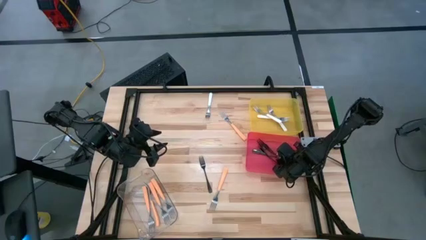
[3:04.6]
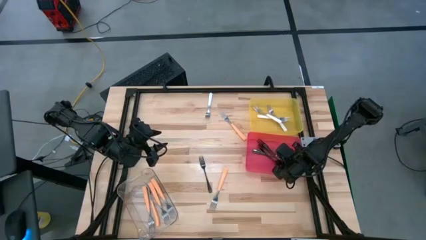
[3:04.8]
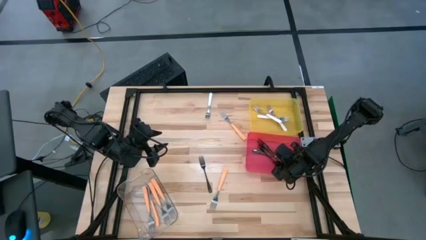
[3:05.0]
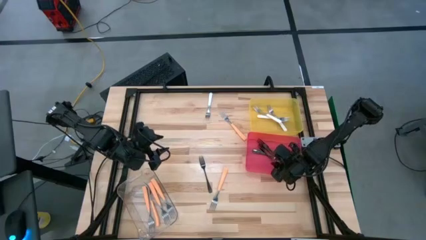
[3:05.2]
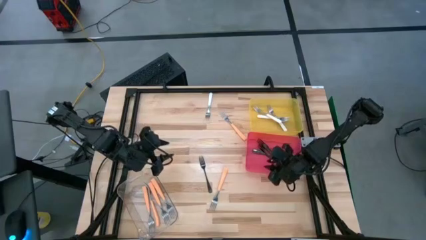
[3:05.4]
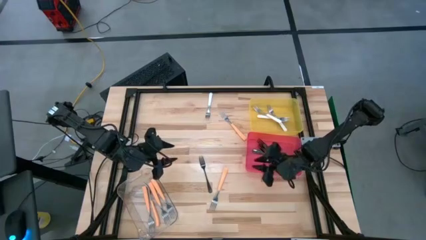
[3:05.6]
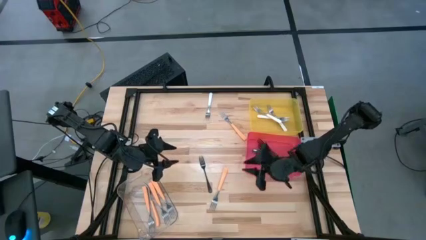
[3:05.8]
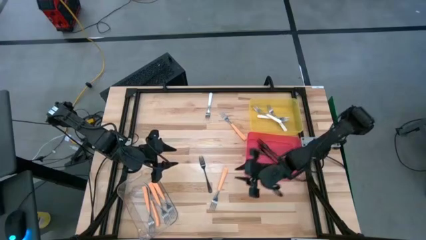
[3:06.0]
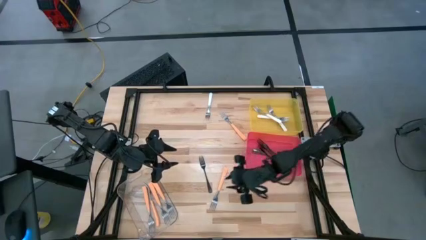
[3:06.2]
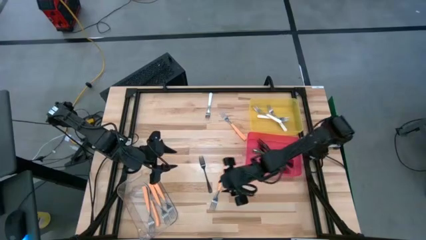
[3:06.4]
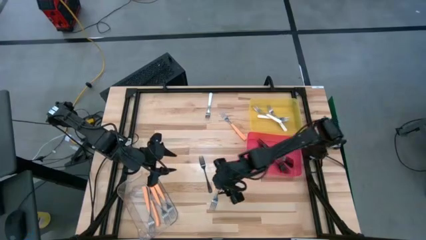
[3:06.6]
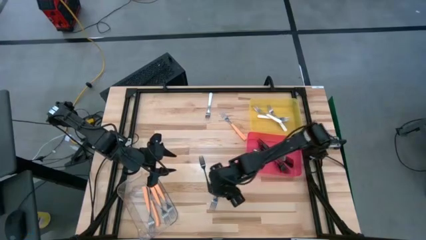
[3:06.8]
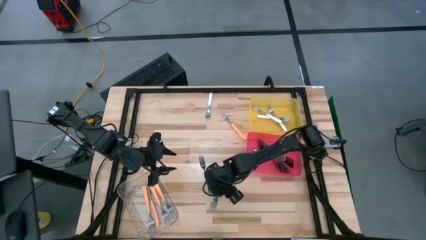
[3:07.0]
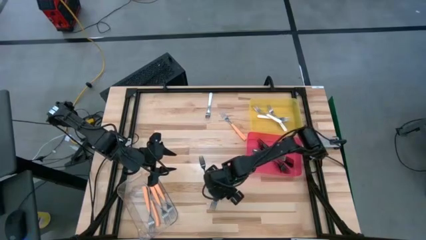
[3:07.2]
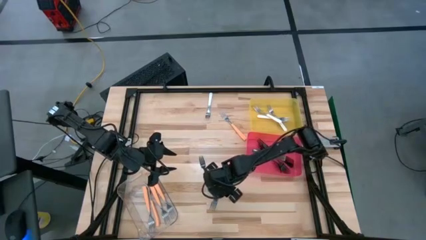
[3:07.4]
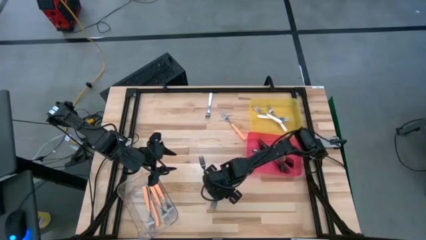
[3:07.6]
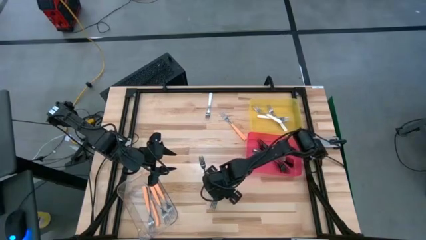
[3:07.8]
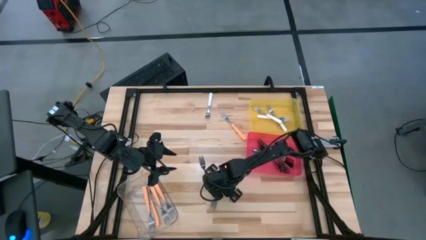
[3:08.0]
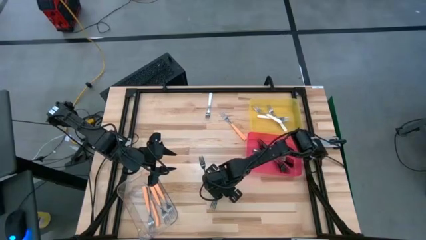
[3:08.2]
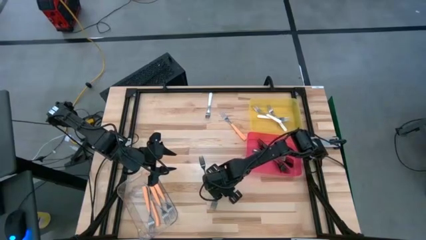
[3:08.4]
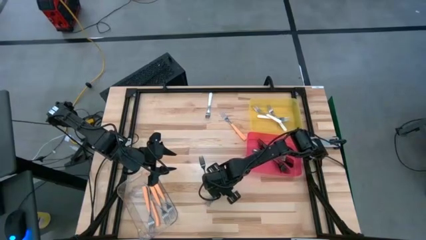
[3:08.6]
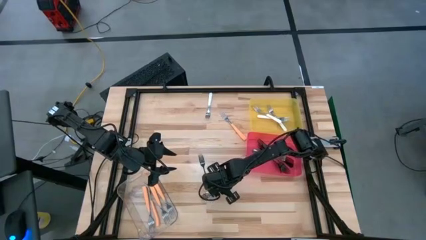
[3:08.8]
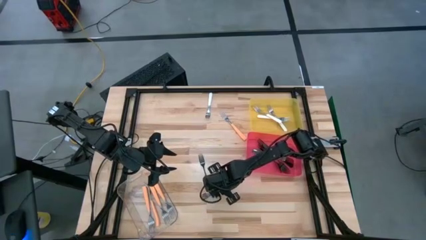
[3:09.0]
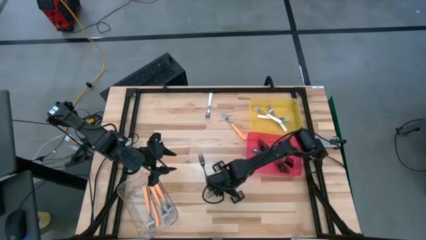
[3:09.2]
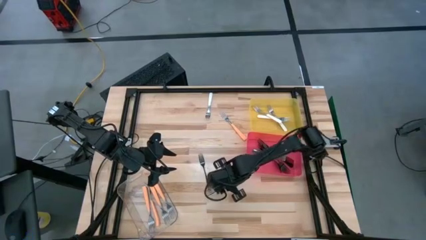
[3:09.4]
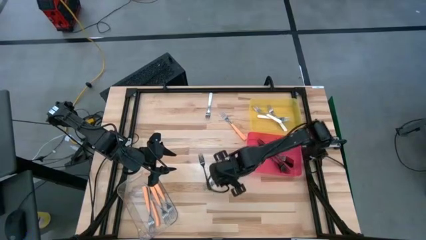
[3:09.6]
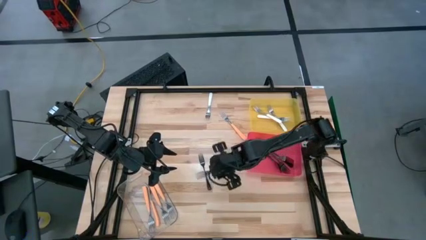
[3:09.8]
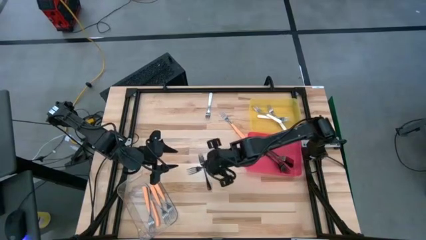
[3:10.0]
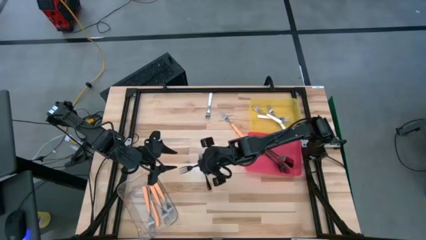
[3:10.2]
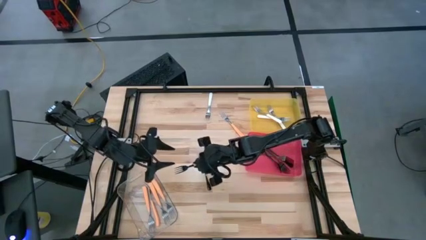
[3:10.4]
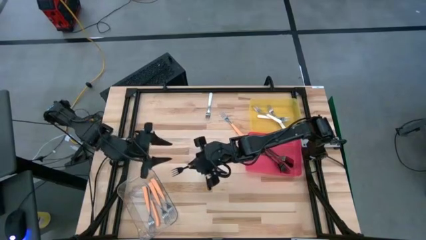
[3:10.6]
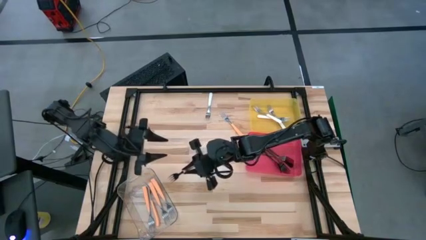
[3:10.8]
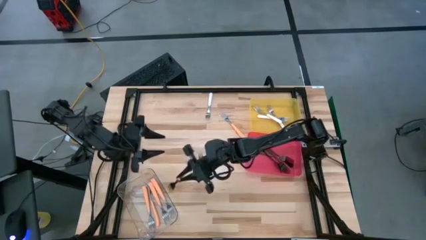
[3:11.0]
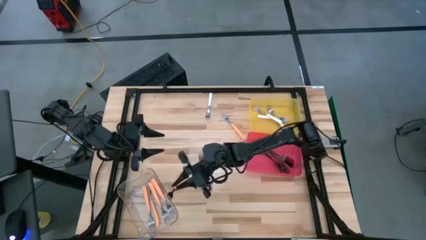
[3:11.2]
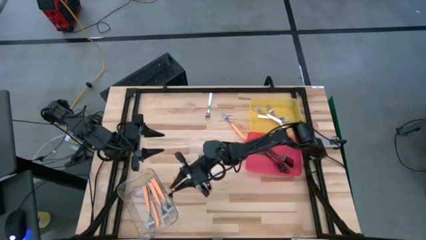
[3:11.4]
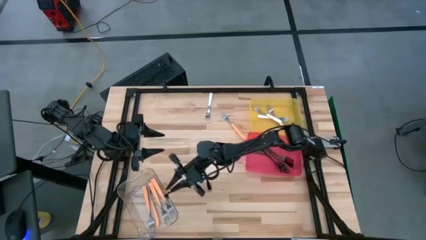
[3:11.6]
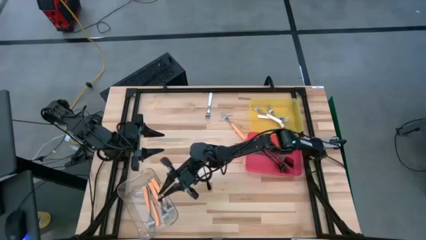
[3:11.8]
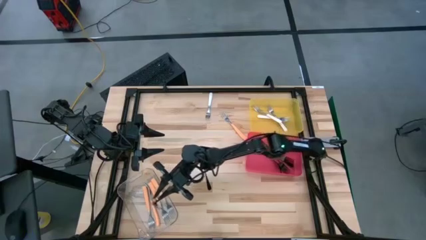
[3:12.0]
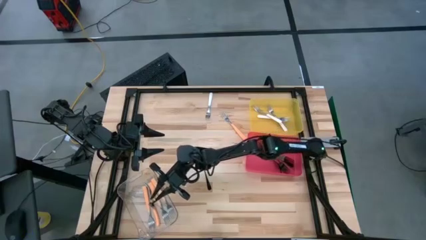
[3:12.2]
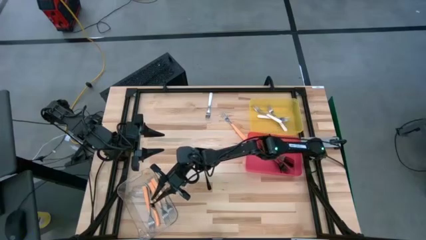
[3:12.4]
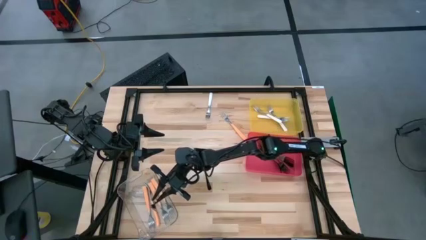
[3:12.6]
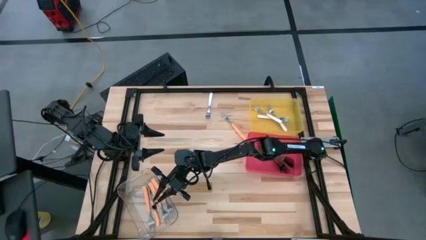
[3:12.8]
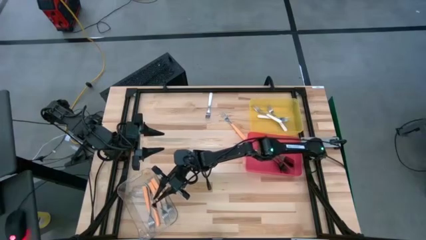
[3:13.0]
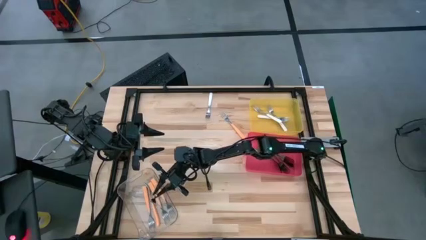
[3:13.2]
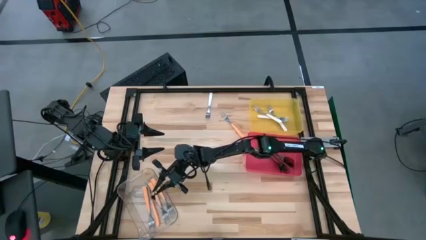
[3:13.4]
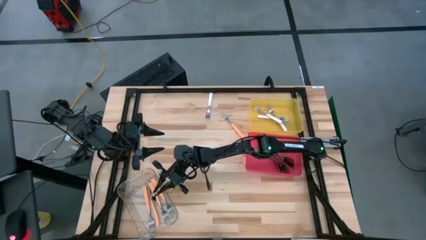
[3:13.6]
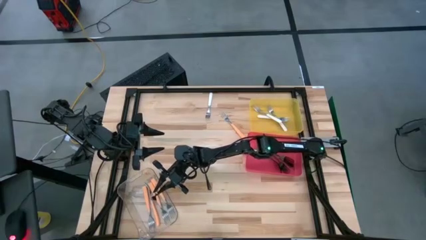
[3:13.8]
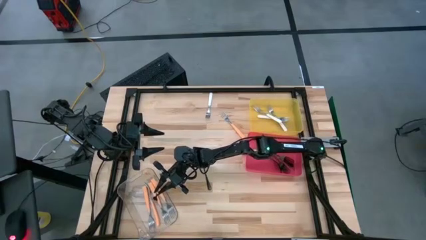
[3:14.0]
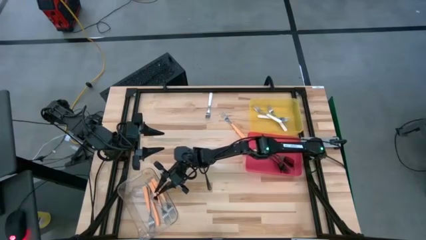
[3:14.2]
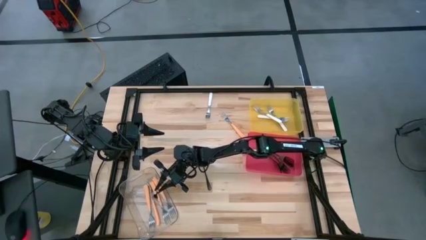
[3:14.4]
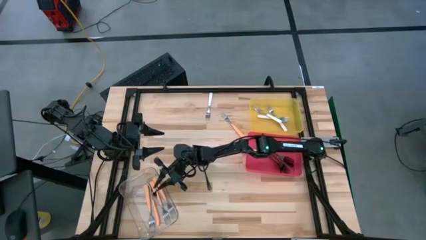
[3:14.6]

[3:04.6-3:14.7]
Task: Sort silverware by color (type)
Put the orange fork into the transparent bin

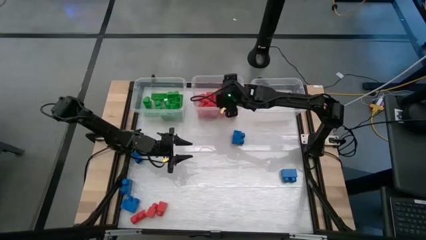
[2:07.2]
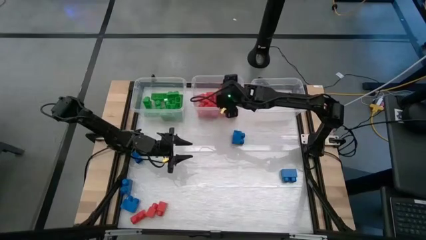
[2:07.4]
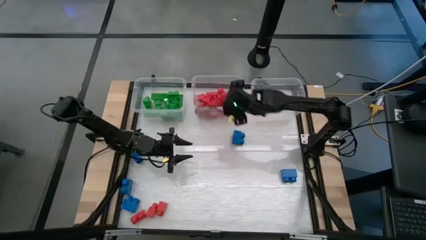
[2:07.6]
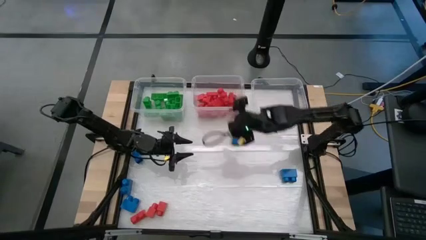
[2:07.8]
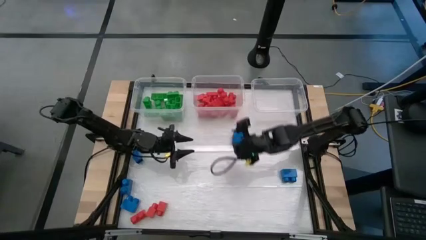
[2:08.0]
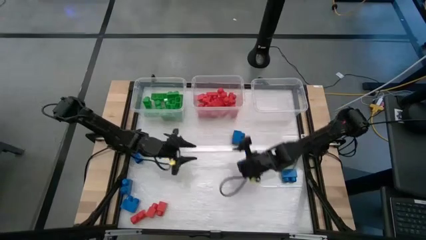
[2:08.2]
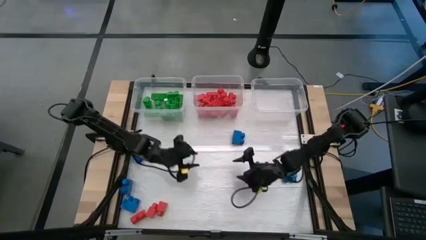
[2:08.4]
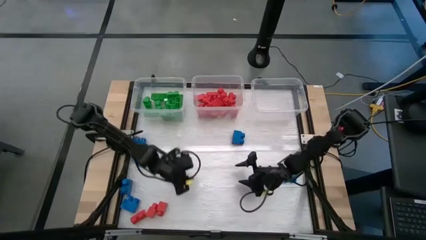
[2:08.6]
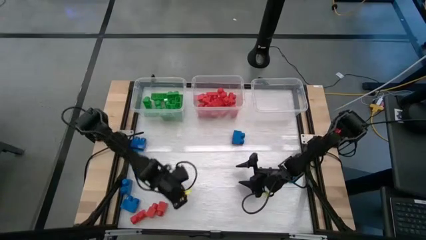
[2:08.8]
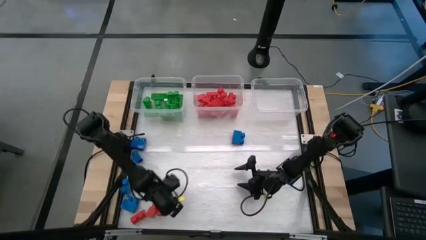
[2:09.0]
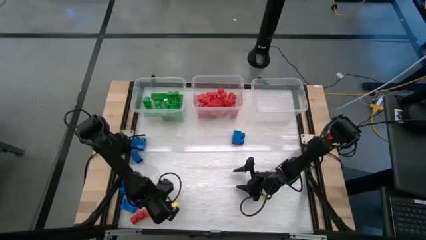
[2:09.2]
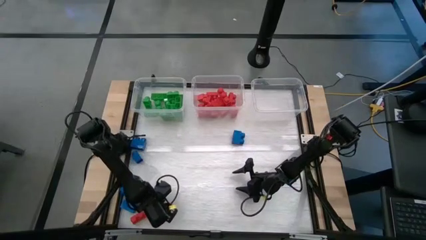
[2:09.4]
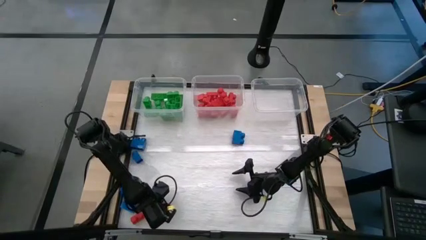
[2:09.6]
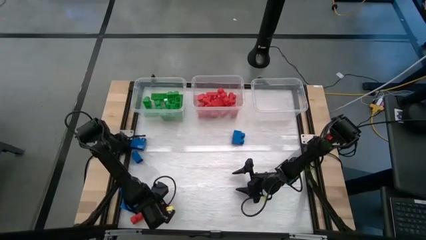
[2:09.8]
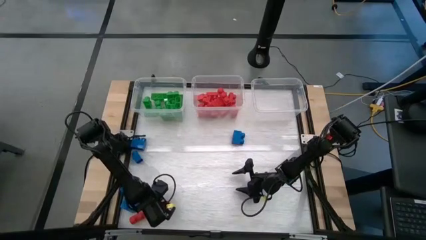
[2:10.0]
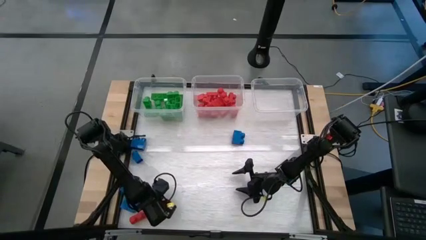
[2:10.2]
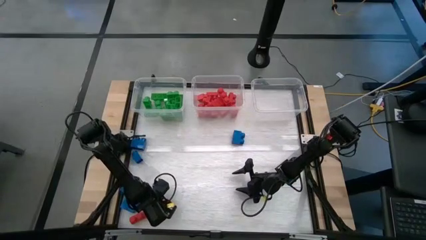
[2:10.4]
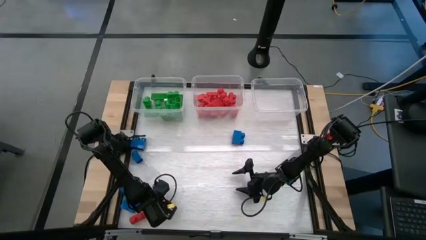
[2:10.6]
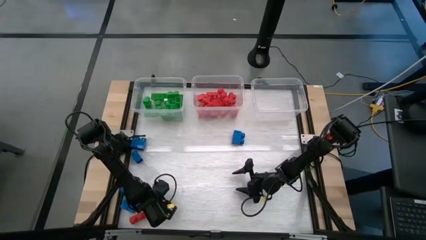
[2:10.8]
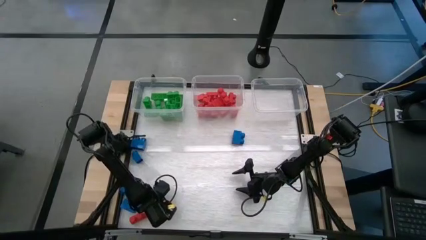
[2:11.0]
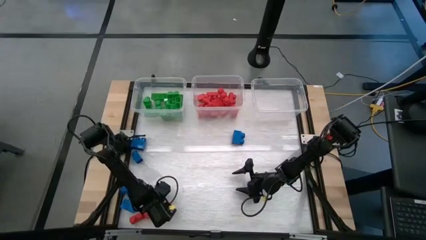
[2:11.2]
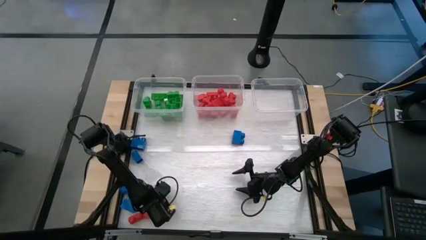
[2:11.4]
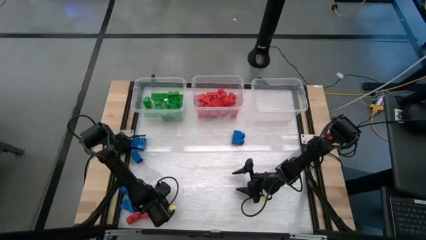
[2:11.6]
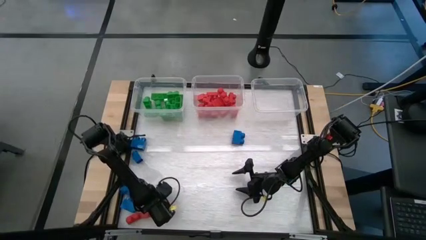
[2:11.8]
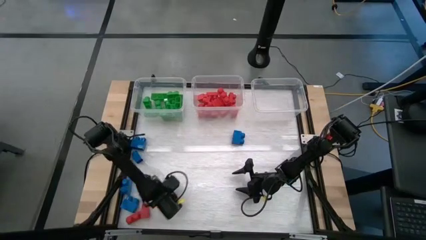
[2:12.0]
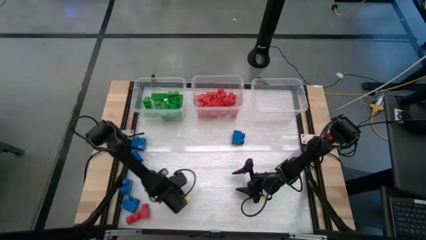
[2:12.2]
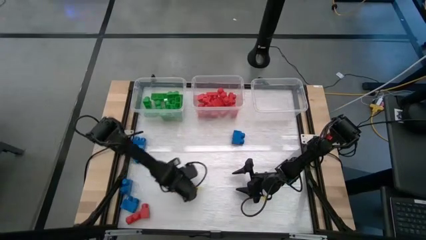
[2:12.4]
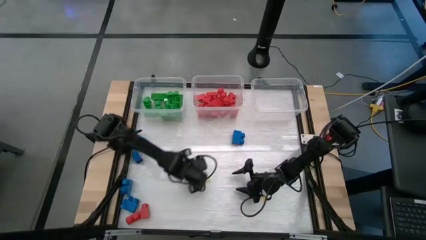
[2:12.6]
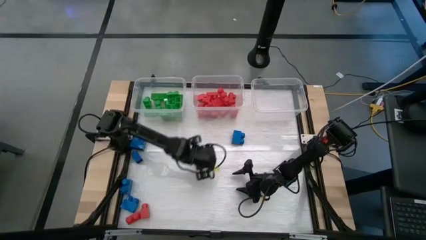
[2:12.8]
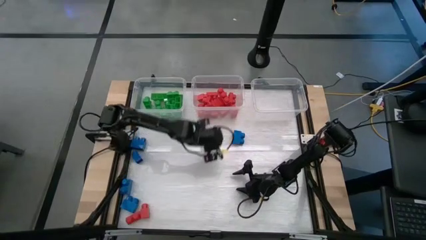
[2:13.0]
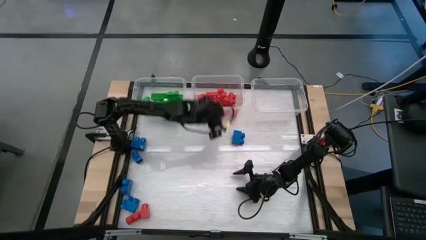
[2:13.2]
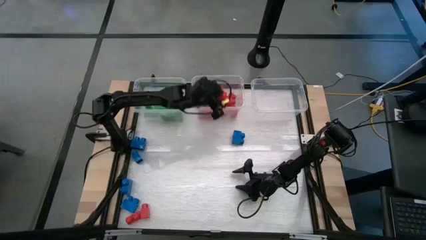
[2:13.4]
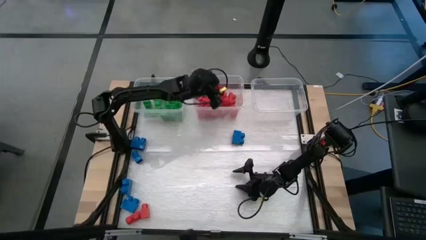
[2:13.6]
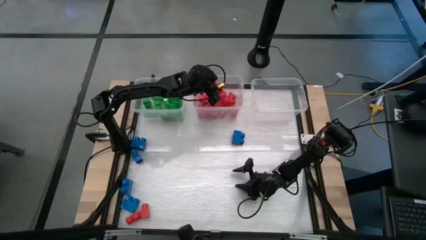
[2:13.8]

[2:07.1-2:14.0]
Task: Sort blocks
Put the red game piece into the middle transparent bin
